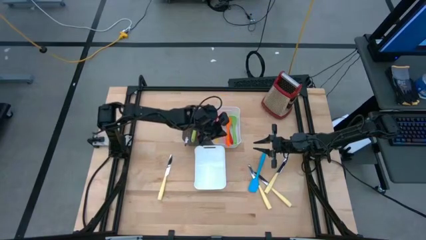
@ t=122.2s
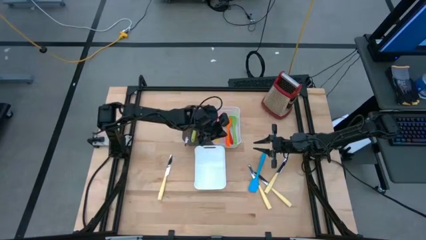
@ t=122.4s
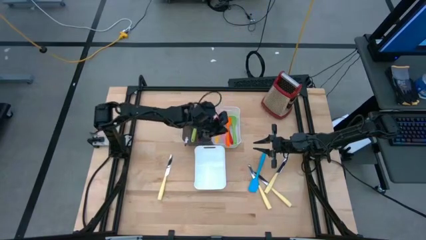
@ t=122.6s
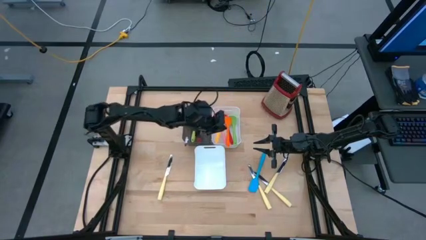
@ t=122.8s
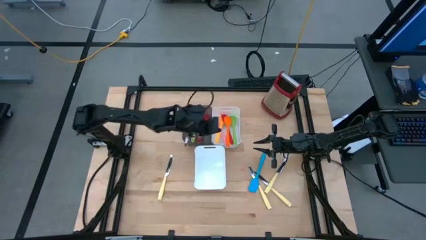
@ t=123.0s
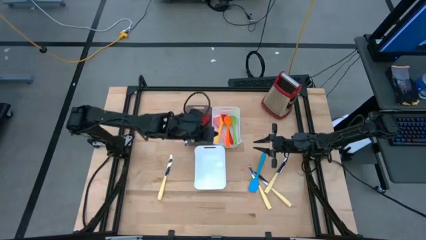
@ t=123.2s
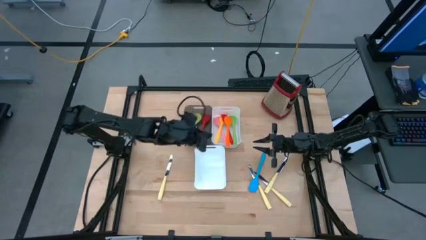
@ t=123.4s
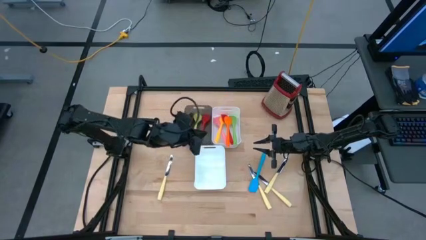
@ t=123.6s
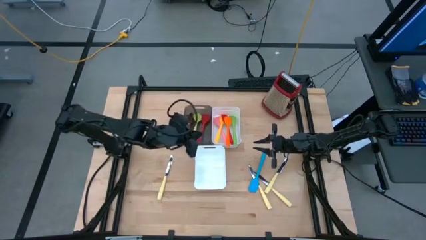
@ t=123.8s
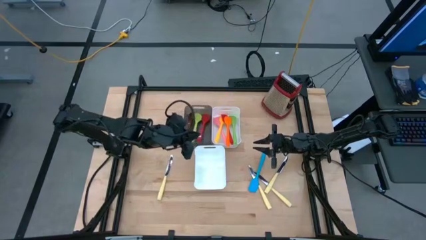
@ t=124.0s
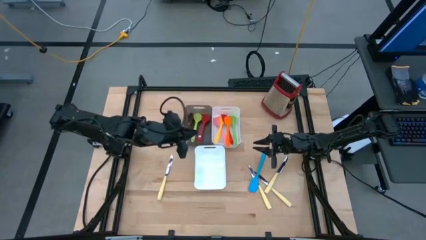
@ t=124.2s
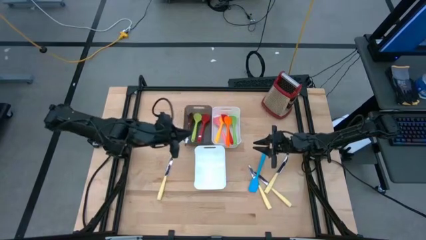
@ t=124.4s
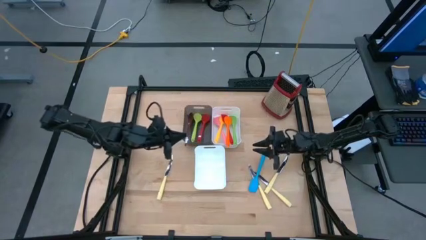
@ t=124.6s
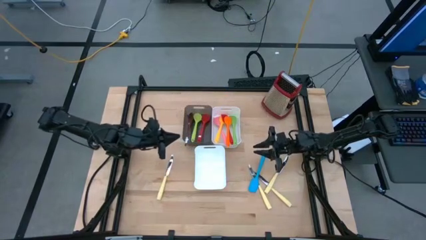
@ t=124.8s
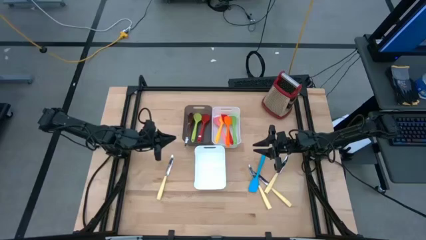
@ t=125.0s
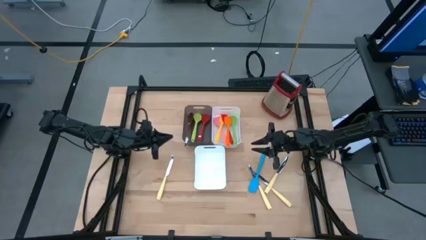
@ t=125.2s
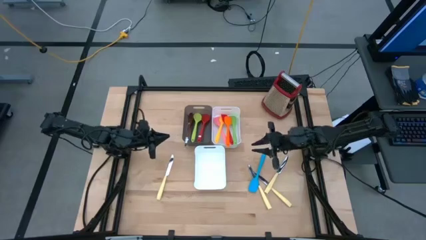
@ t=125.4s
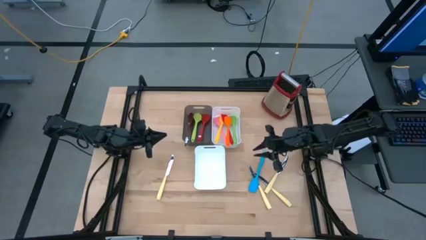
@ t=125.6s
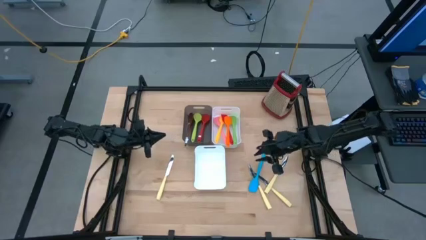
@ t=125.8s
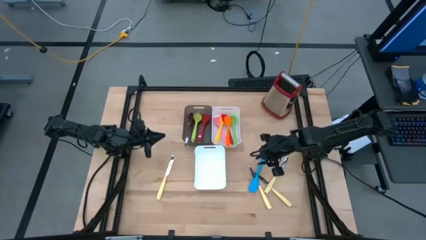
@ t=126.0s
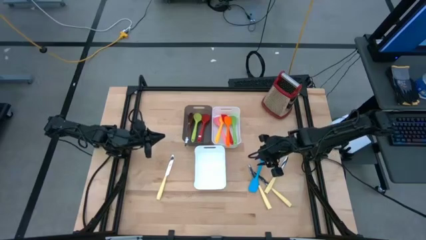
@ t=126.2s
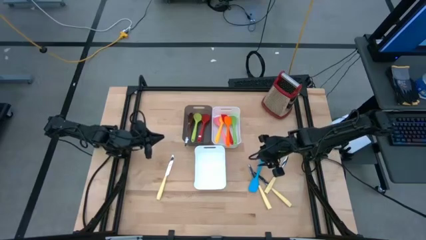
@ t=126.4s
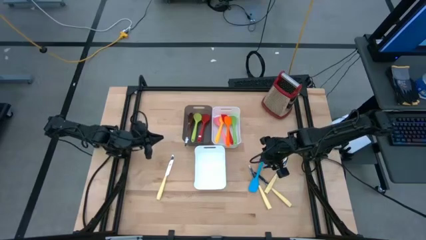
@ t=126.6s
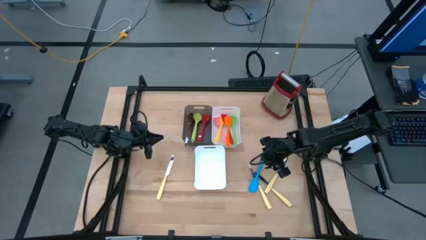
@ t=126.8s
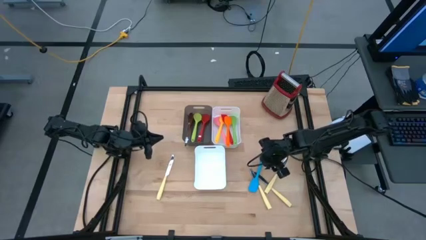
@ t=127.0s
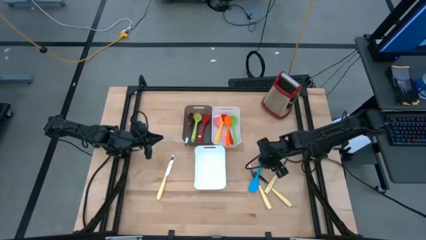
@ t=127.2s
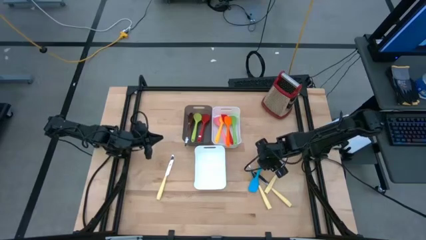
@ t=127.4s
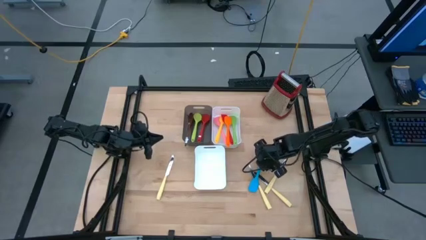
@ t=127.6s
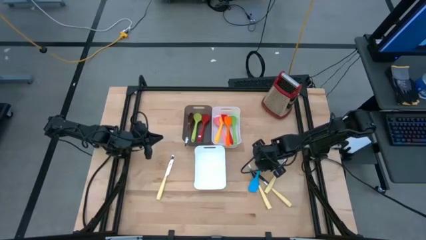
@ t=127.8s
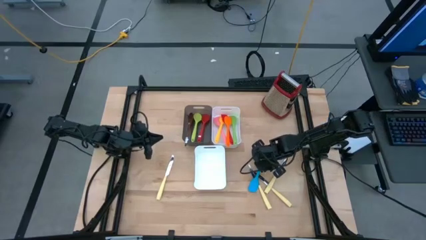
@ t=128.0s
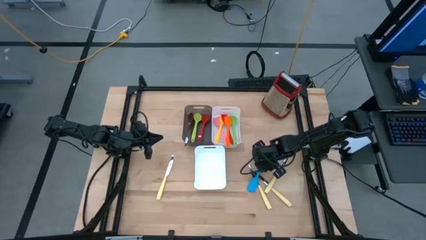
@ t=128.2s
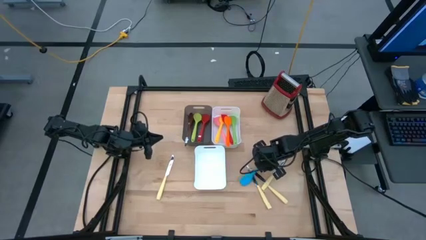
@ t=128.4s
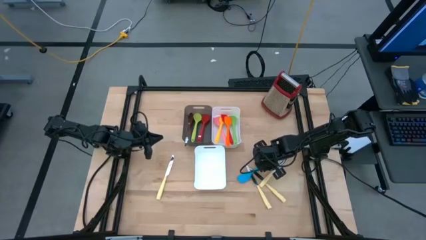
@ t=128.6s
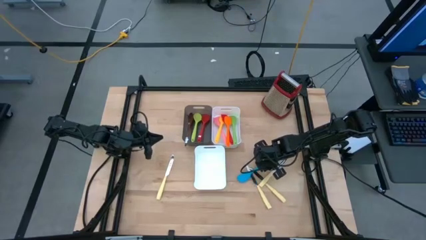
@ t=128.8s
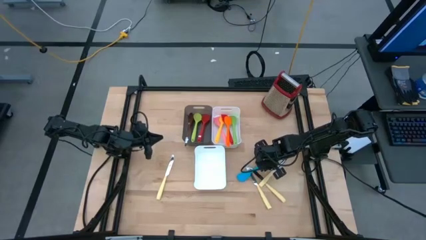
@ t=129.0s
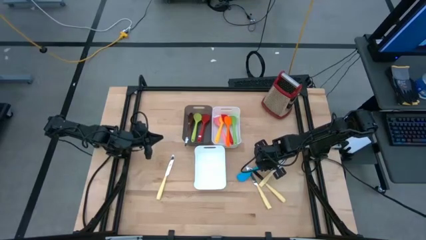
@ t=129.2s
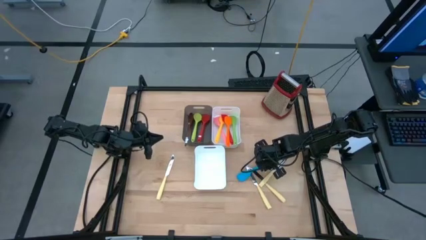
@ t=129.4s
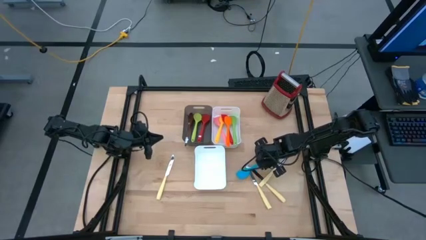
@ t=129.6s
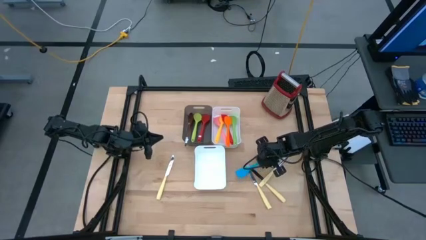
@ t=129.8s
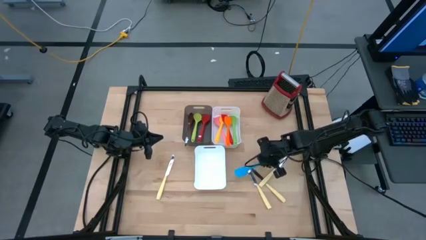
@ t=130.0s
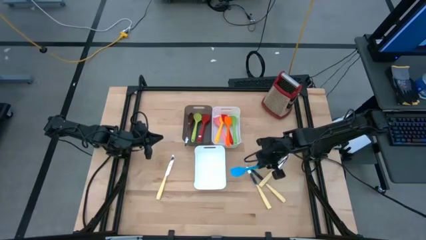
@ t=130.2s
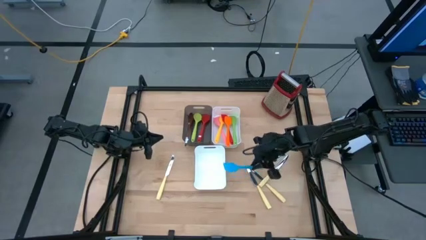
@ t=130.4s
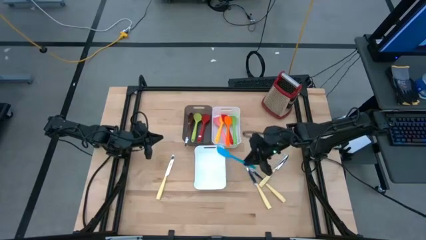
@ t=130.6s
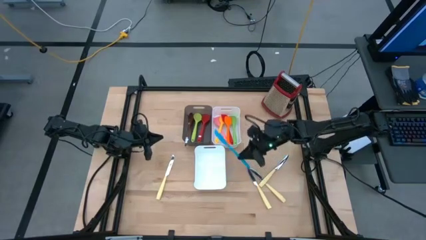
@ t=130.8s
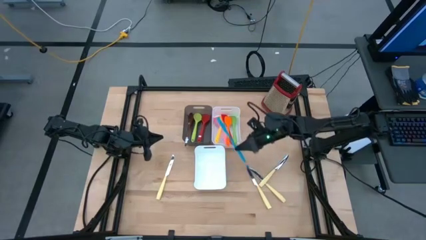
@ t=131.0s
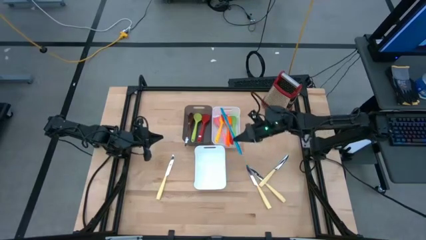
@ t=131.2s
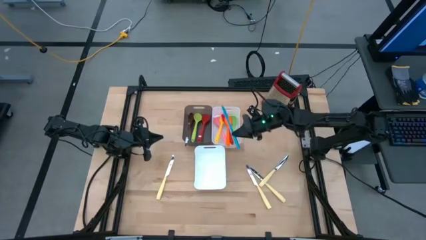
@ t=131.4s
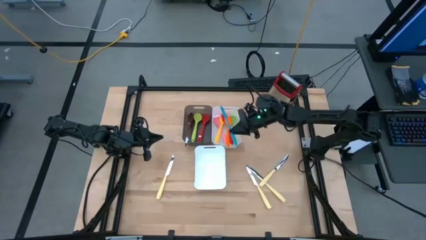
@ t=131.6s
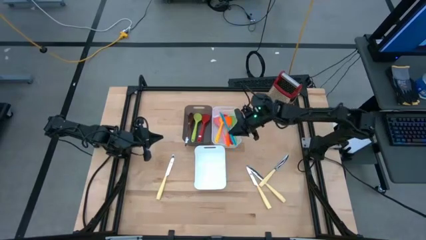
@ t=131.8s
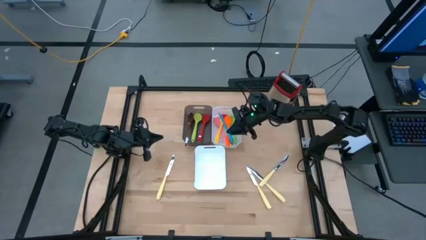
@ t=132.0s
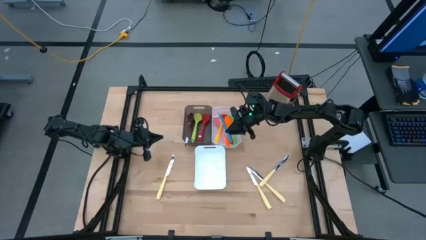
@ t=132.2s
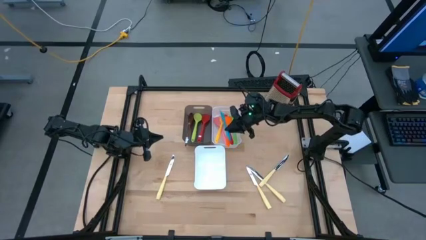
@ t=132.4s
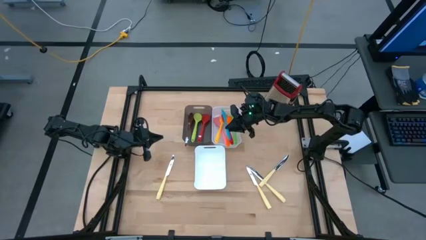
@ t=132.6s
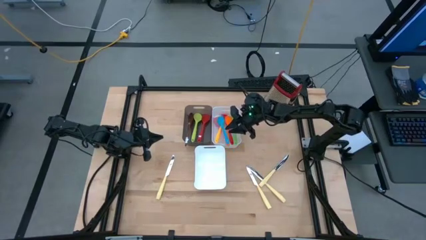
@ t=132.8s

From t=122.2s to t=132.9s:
Task: Pick & Place Kitchen Items
Put the blue spatula into the top white bin
